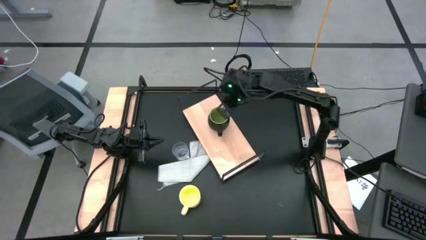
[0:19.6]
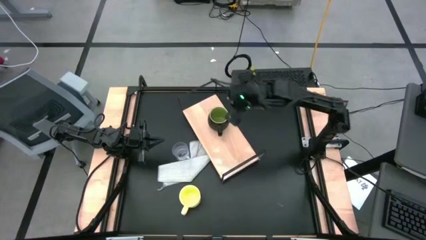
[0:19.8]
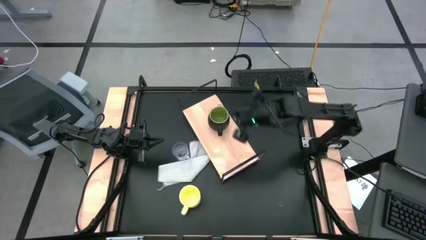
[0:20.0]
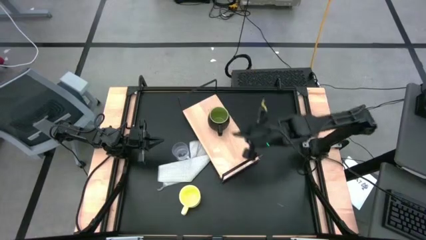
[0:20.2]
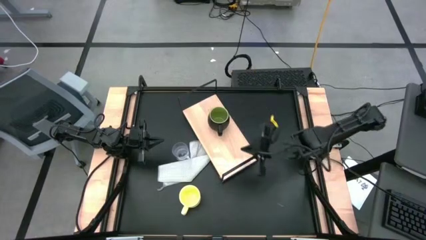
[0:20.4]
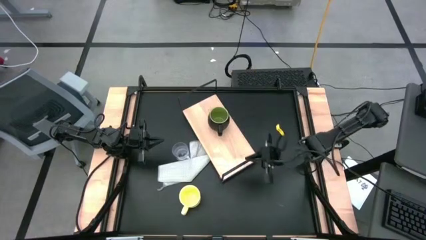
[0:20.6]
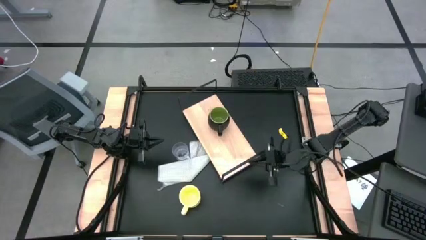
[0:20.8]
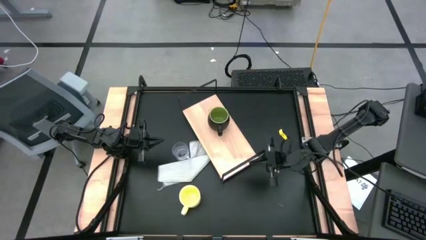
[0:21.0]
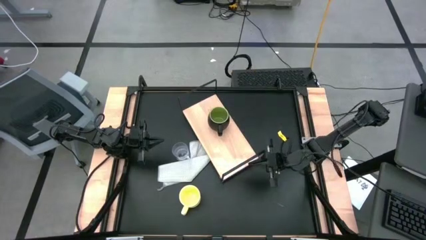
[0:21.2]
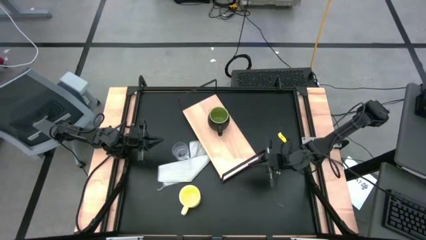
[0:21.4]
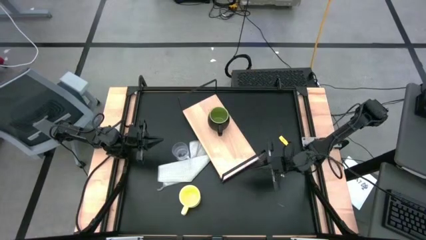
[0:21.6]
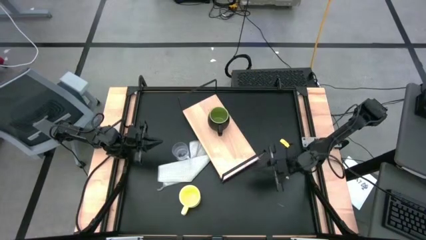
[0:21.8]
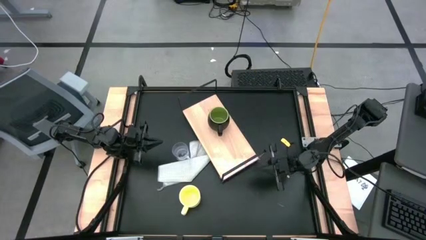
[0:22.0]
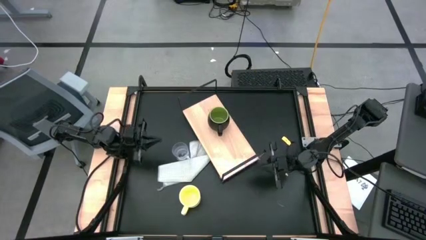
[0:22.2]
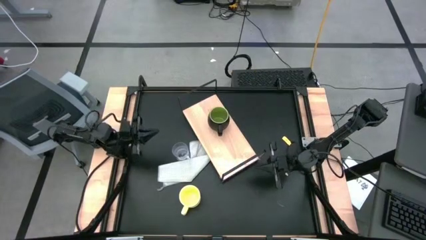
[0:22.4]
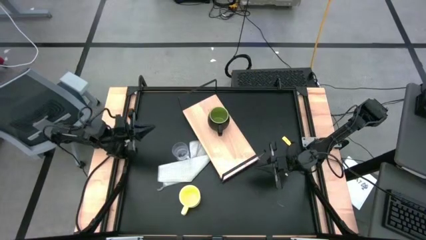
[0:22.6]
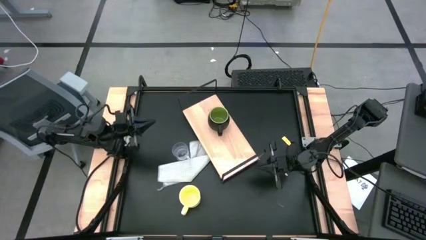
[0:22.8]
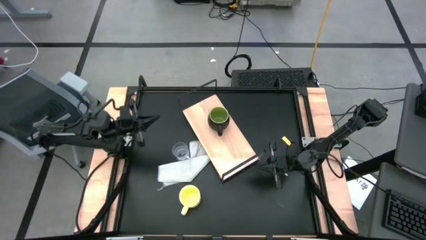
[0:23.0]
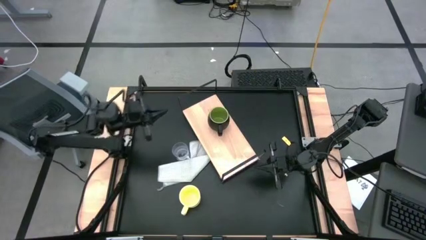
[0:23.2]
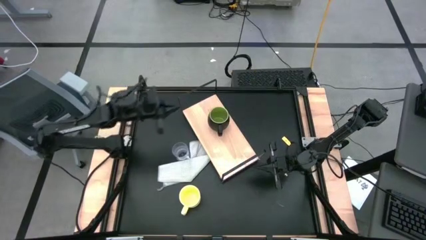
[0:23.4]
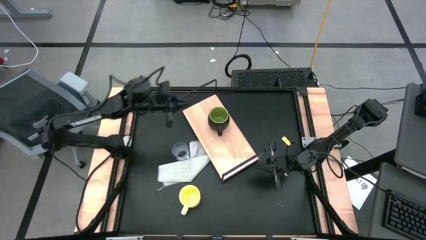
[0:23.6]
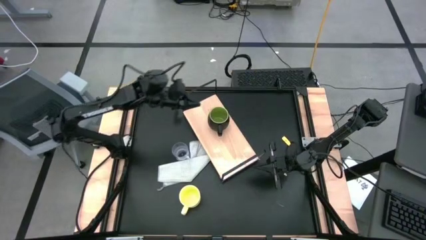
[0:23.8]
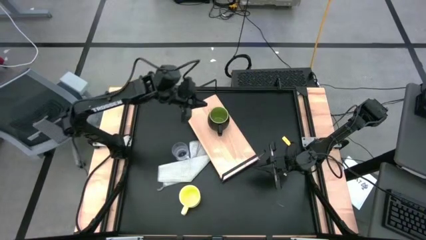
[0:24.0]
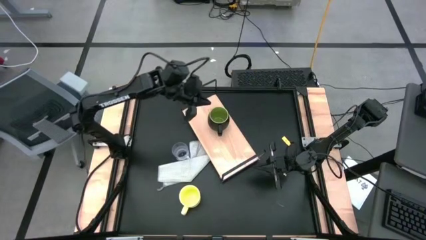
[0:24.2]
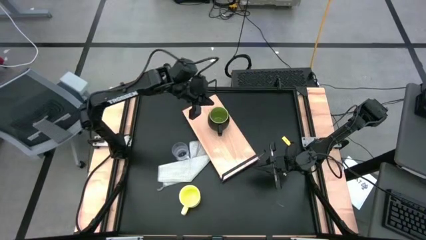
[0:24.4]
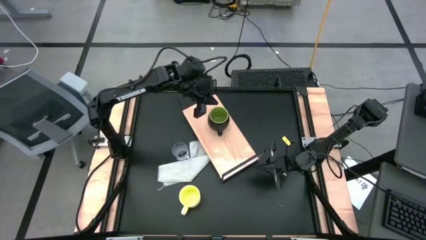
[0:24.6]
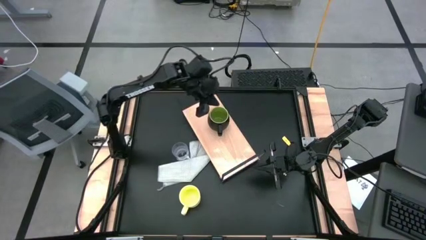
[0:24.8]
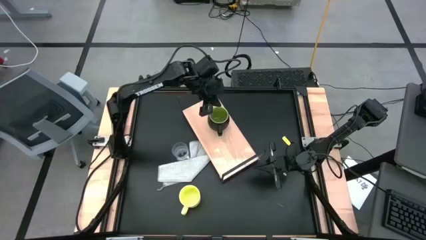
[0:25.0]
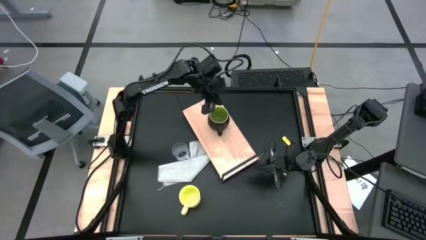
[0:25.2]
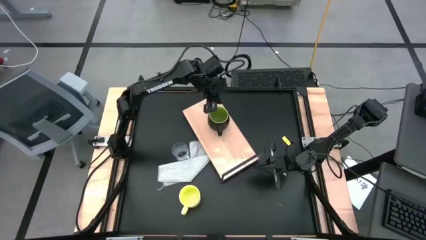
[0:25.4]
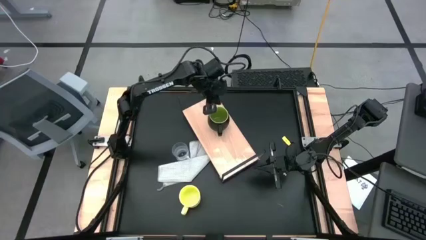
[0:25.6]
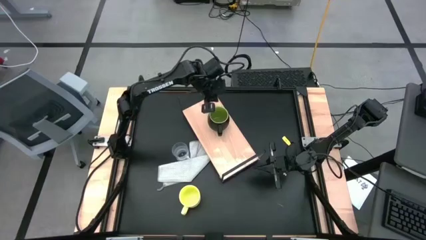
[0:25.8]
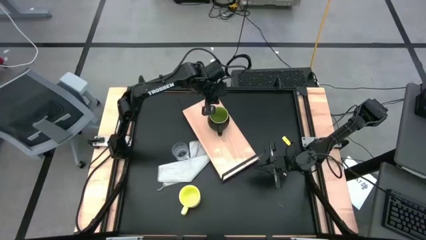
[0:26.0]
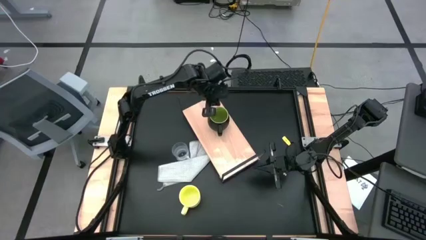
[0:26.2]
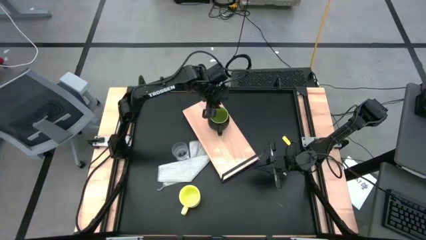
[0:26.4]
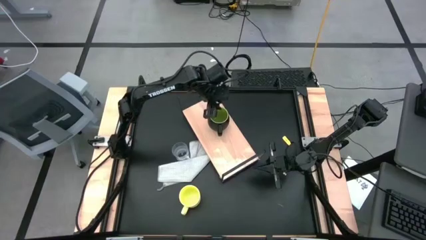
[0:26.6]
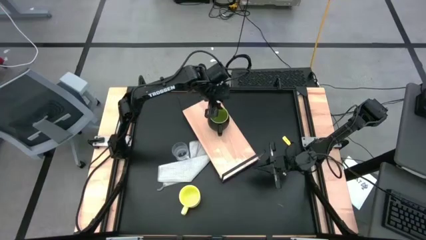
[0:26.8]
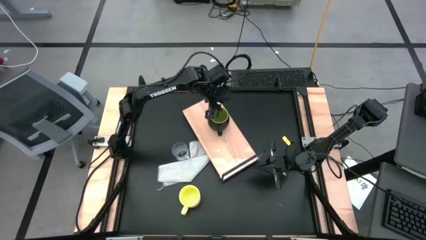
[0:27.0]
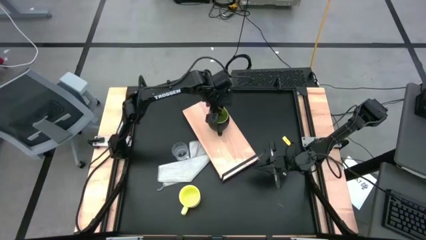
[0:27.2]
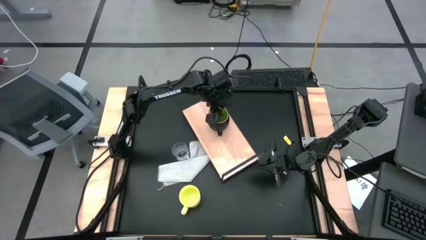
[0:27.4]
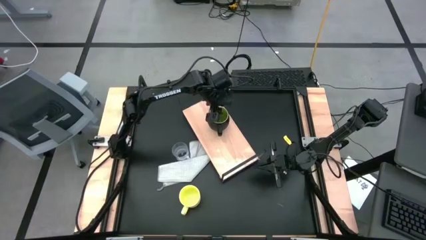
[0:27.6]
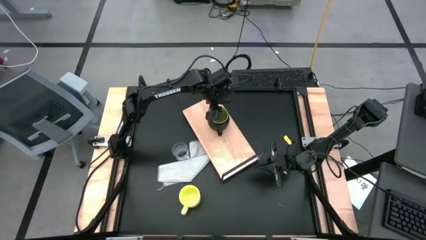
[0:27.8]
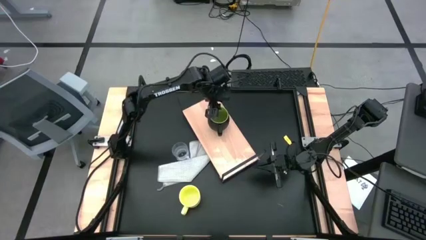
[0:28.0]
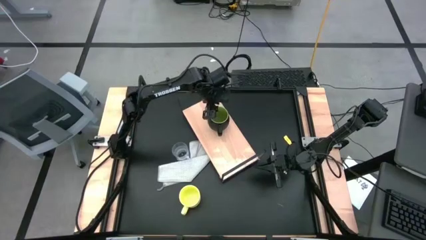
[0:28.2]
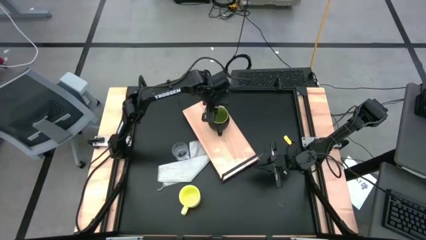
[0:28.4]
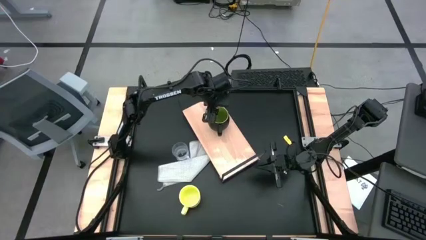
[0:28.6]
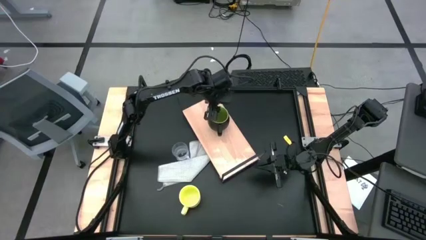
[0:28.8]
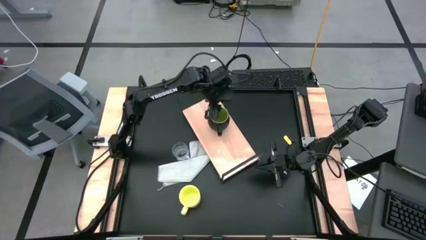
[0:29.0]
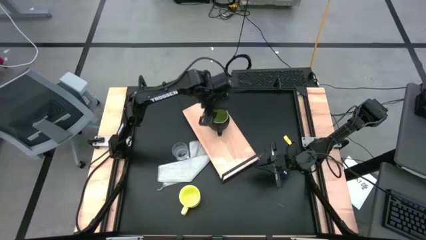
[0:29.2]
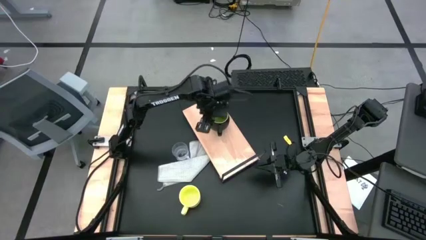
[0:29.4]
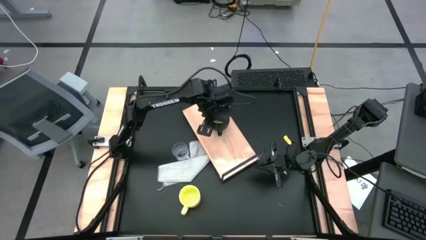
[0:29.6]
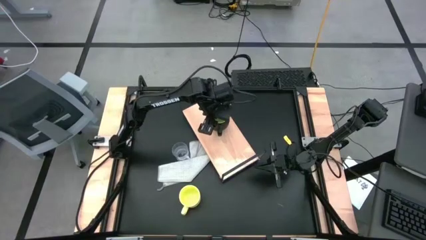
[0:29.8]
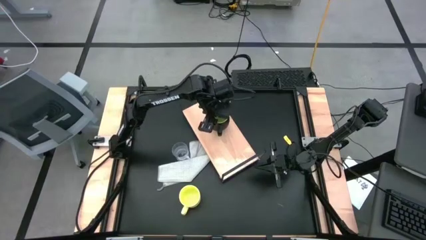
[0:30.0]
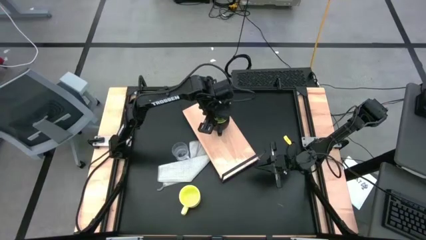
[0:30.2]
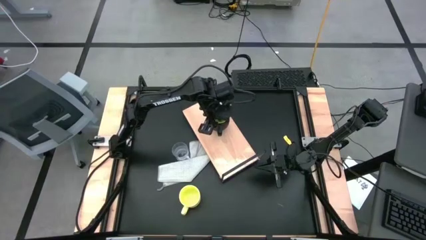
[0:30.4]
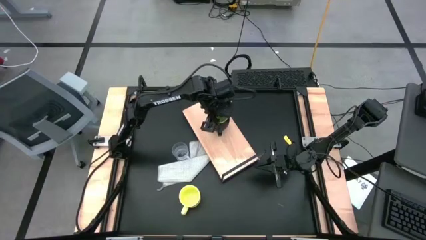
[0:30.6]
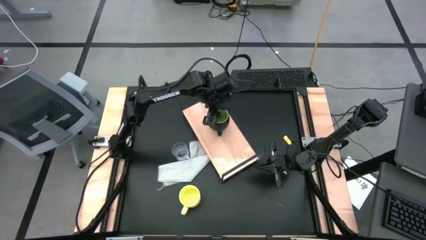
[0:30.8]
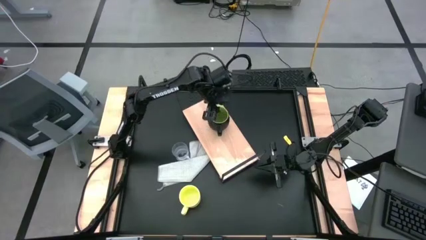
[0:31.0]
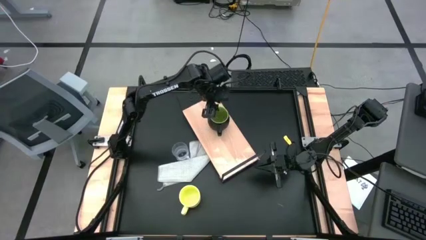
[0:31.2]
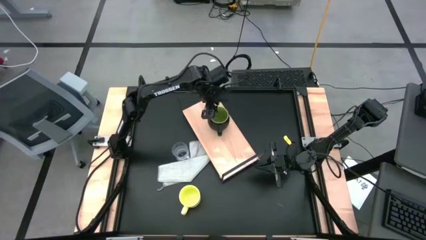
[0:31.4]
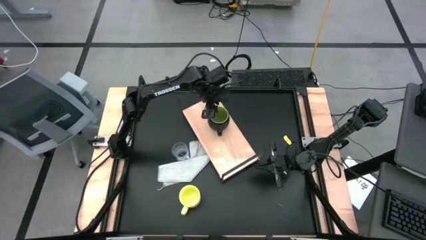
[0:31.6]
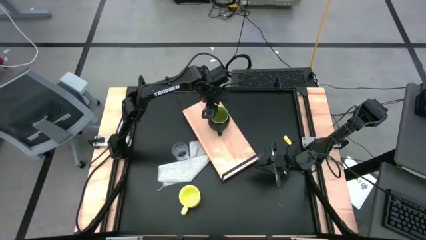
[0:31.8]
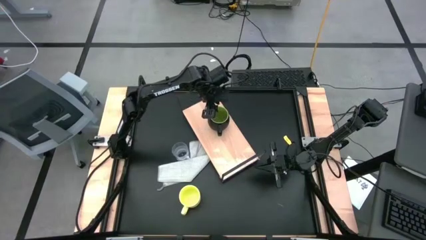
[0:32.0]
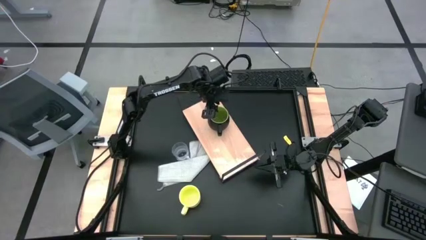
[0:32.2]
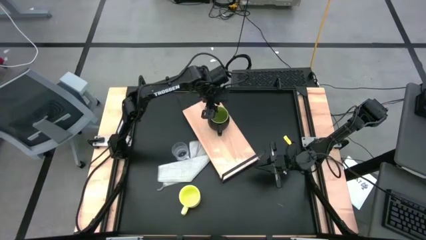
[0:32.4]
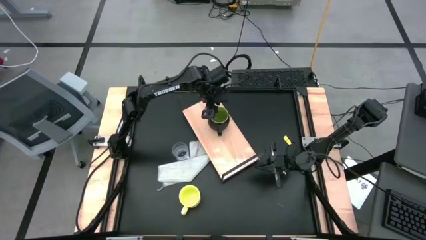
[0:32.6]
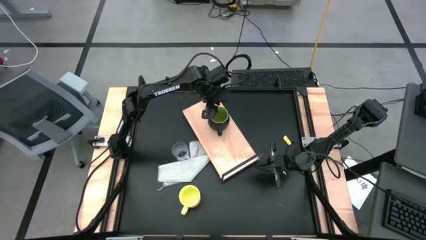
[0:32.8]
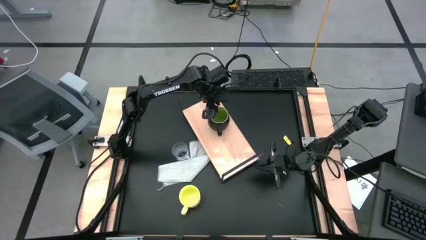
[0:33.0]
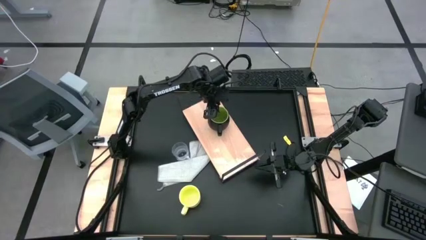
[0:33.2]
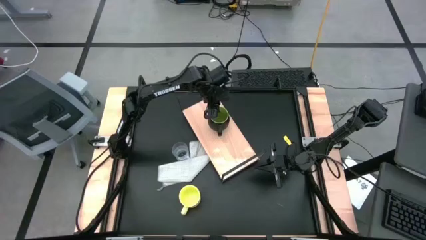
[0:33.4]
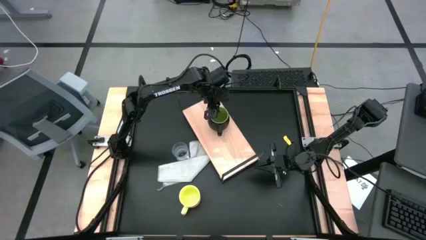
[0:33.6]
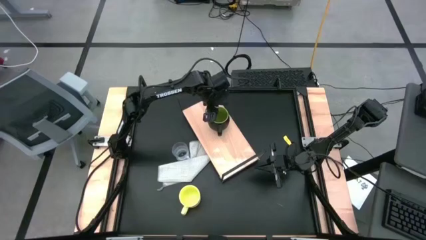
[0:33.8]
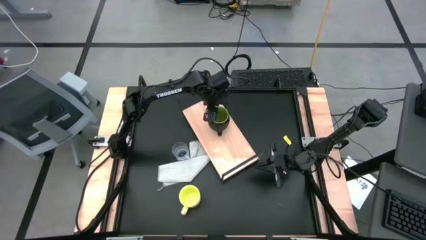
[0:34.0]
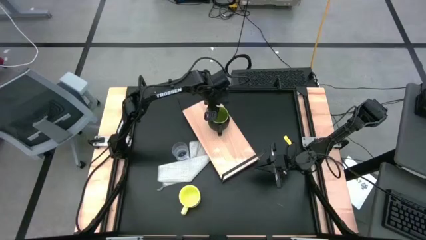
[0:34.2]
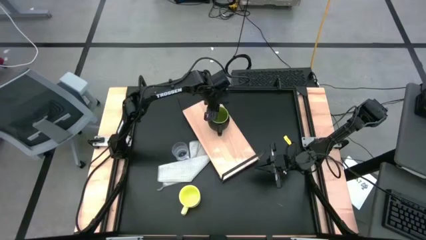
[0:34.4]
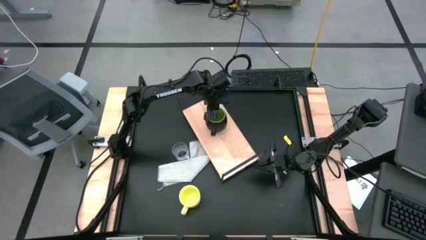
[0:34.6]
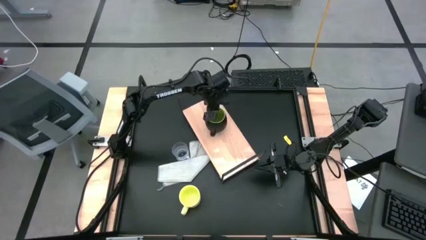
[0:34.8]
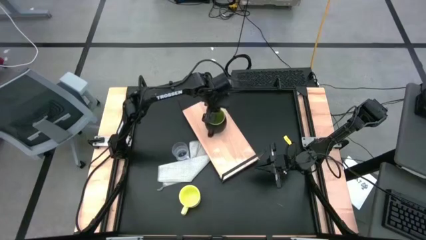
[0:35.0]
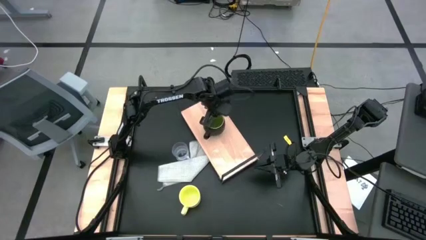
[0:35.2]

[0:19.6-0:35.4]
Task: Stack small to large cups/mugs on shelf
Put the black mug on the shelf
